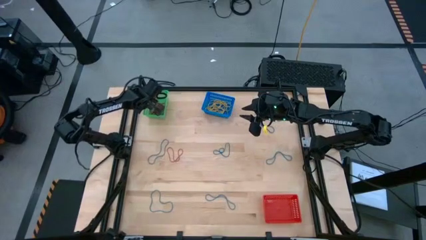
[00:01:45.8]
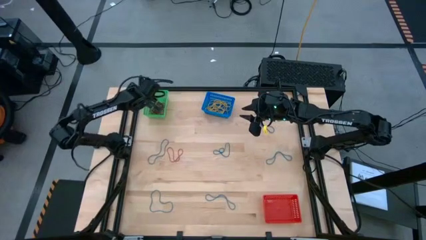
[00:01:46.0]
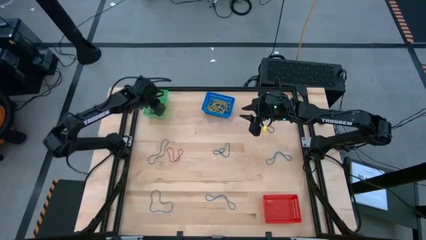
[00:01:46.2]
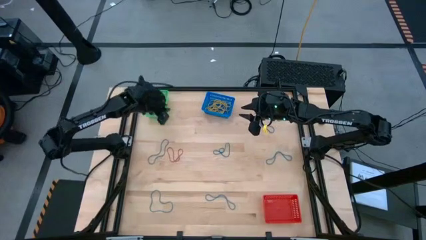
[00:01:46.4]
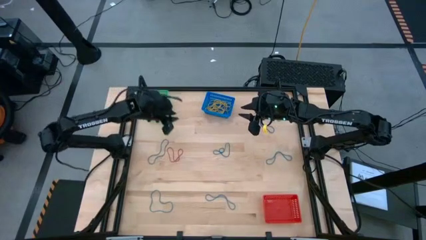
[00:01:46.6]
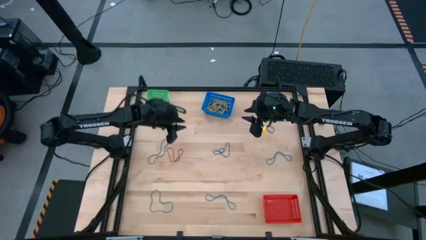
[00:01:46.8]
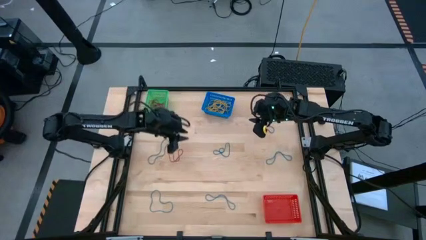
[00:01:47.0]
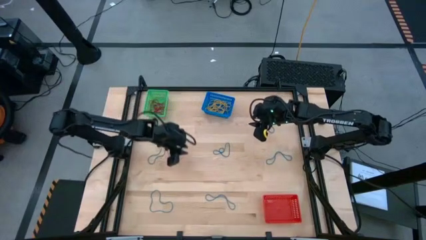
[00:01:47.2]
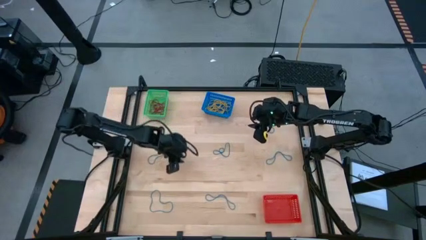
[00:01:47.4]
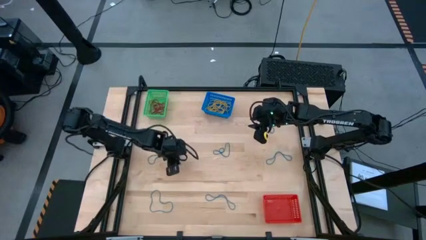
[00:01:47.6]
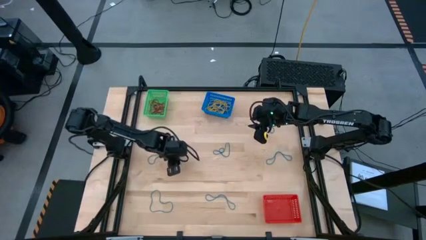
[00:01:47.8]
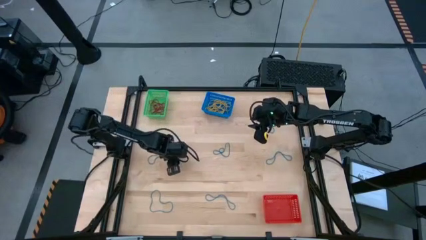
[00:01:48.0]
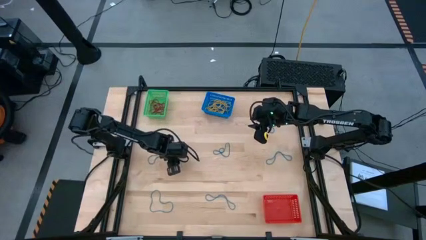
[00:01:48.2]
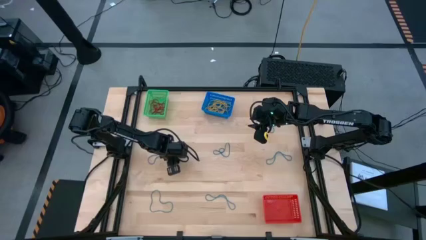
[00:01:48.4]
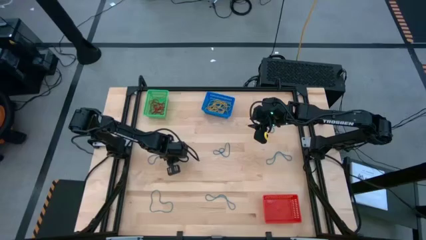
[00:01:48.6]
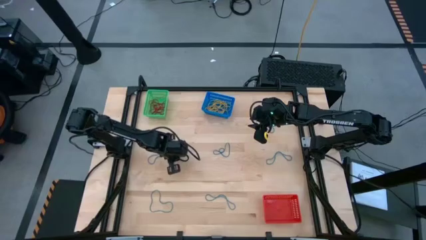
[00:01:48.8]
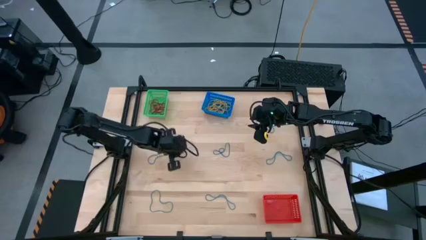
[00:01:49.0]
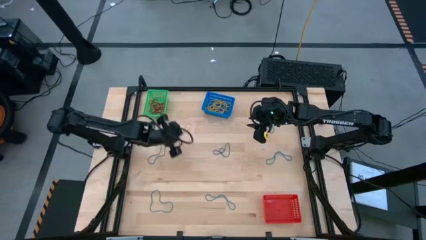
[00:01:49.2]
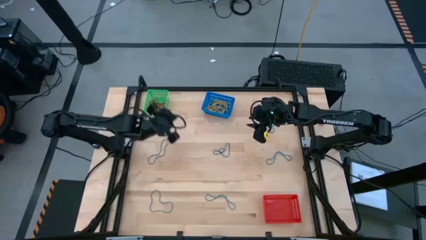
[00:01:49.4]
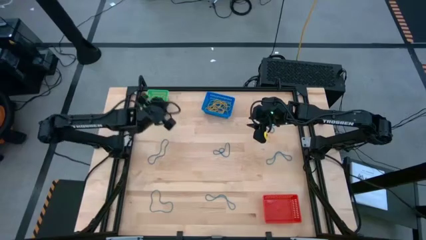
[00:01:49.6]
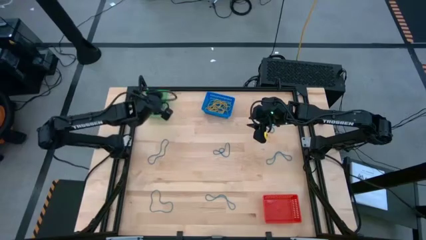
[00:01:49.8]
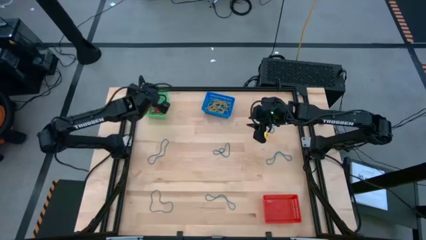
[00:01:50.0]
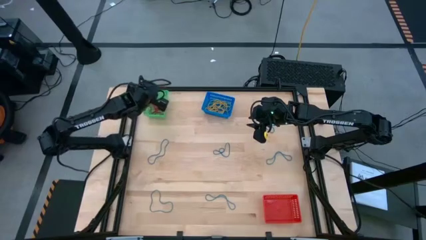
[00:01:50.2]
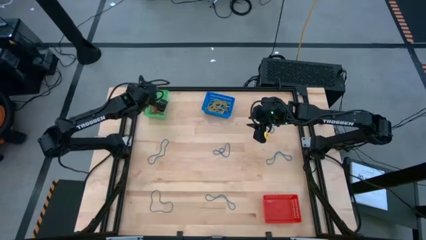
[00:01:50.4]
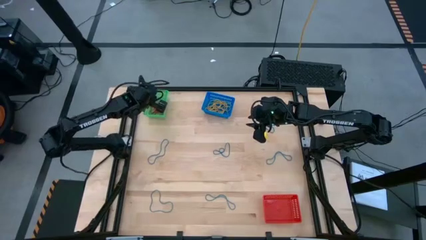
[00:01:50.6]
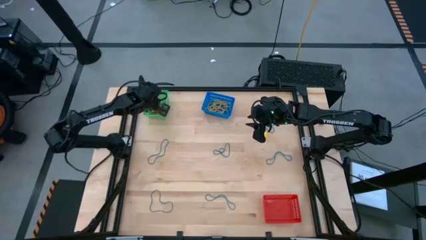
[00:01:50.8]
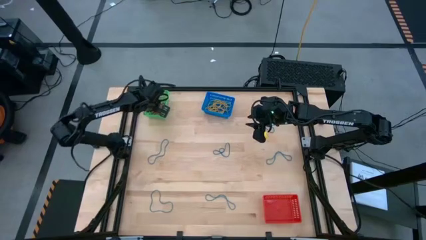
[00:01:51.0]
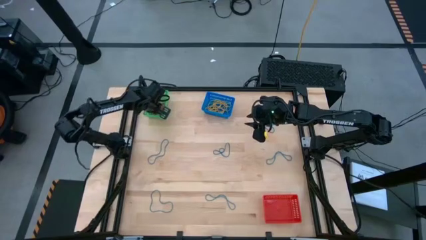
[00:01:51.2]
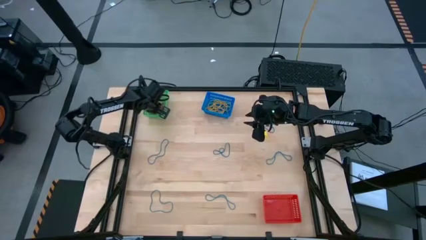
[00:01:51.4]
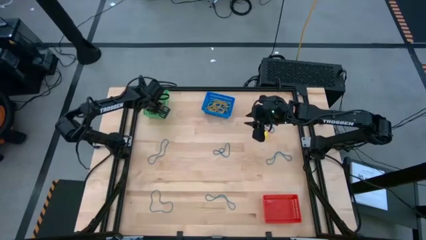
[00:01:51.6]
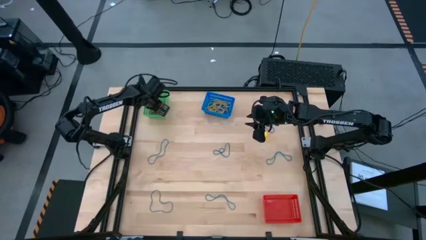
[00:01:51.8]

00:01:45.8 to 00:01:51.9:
Task: Sort rubber bands into baskets
Put the red rubber band into the green bin

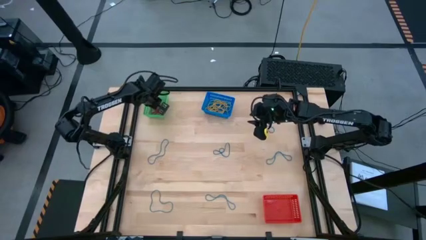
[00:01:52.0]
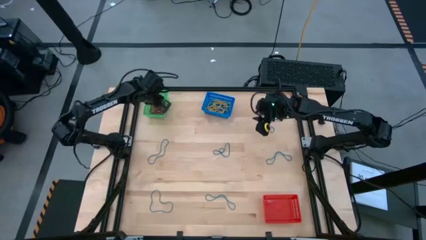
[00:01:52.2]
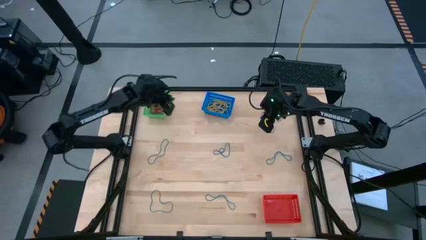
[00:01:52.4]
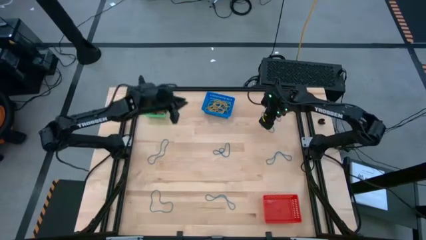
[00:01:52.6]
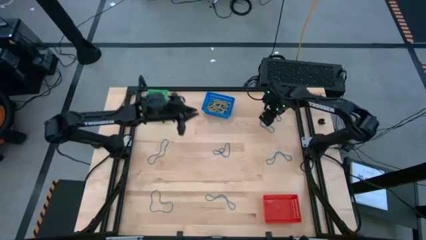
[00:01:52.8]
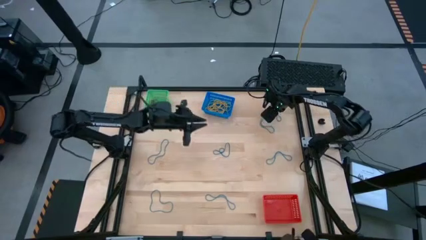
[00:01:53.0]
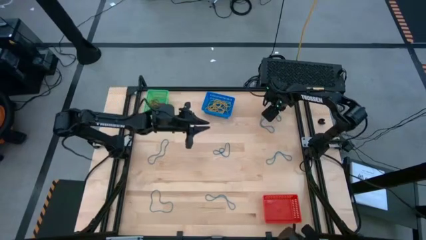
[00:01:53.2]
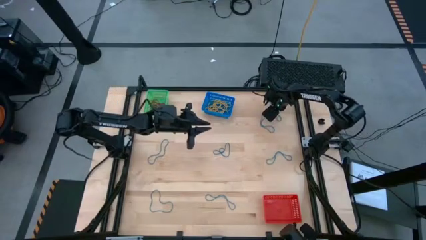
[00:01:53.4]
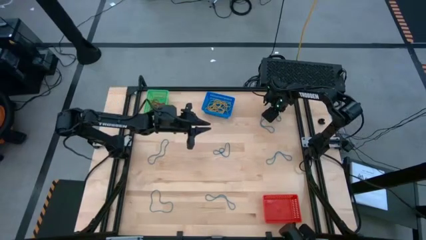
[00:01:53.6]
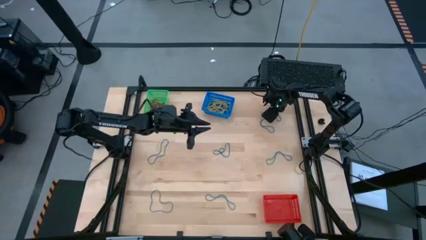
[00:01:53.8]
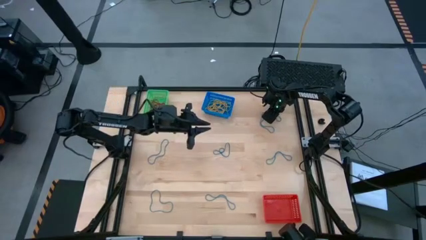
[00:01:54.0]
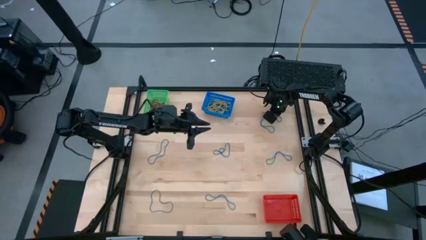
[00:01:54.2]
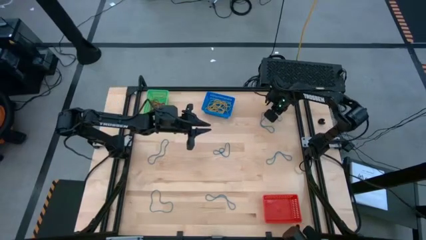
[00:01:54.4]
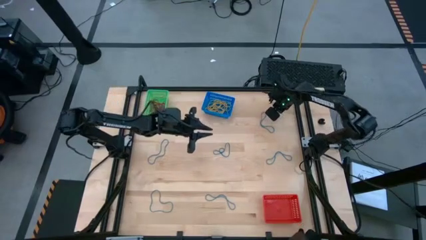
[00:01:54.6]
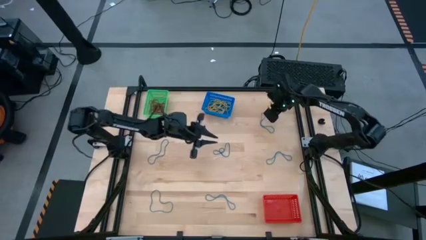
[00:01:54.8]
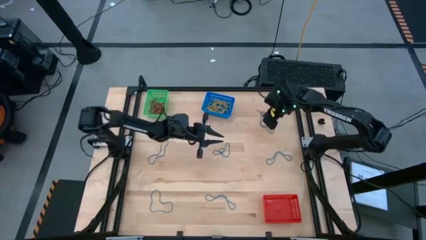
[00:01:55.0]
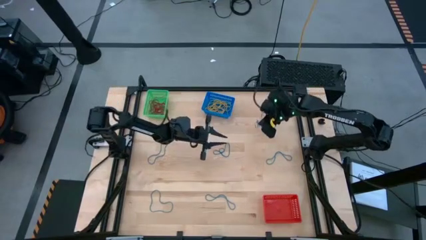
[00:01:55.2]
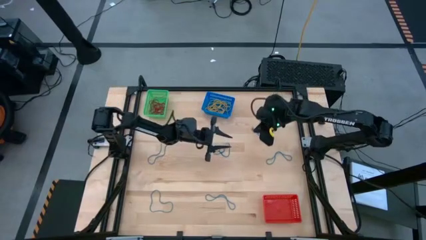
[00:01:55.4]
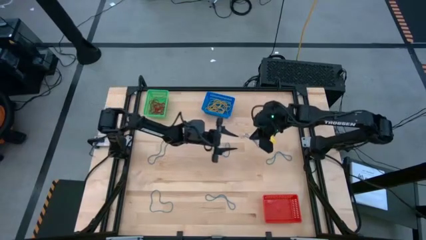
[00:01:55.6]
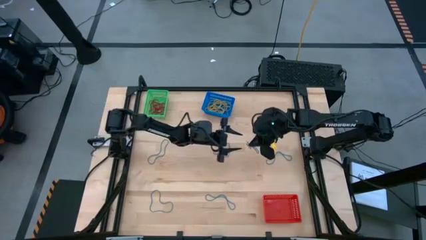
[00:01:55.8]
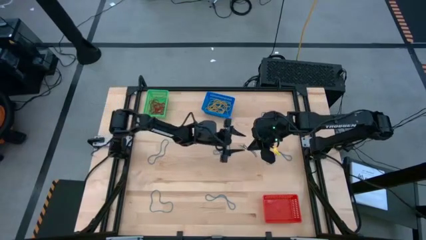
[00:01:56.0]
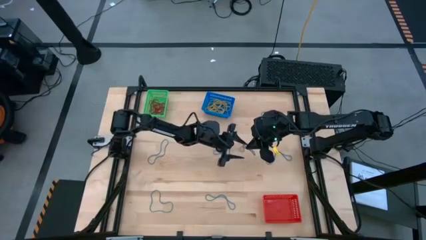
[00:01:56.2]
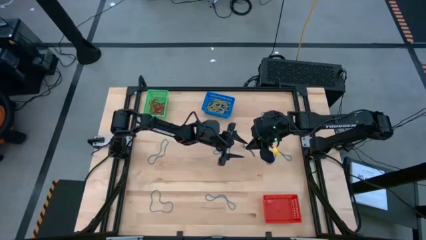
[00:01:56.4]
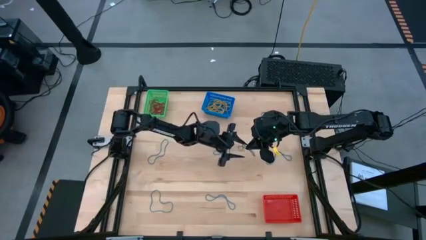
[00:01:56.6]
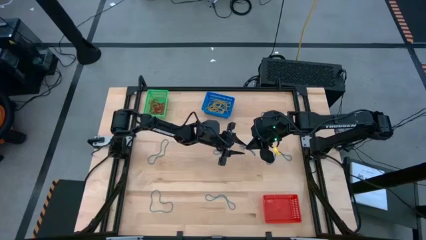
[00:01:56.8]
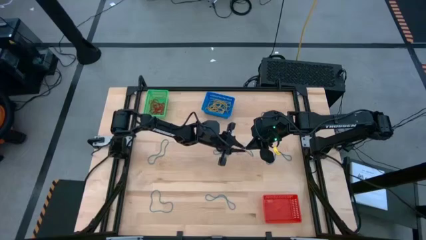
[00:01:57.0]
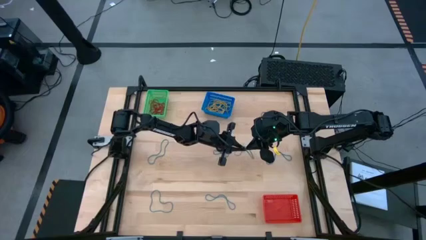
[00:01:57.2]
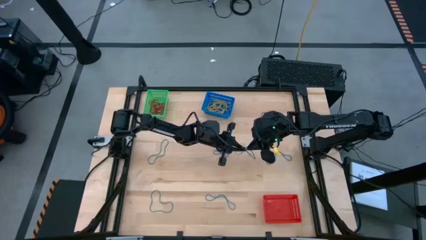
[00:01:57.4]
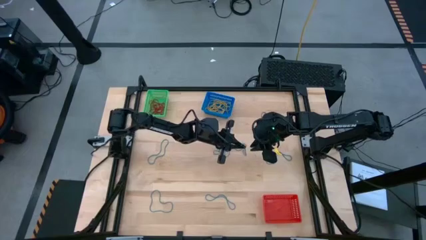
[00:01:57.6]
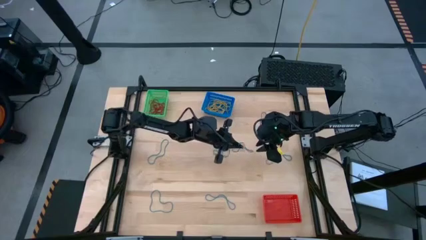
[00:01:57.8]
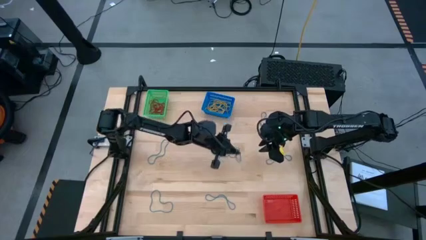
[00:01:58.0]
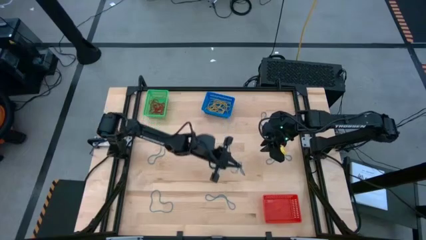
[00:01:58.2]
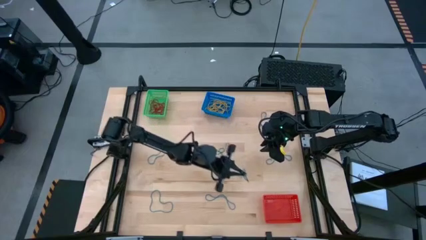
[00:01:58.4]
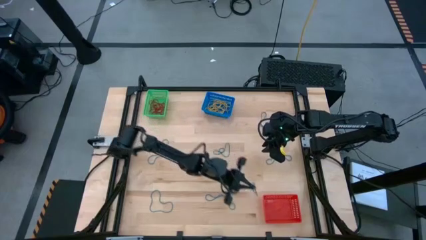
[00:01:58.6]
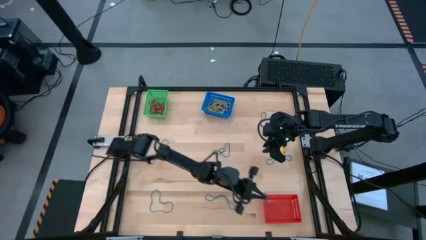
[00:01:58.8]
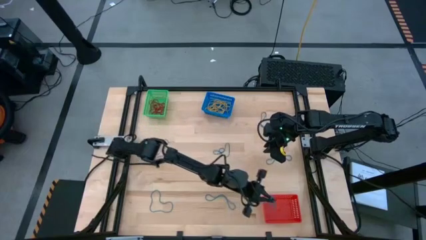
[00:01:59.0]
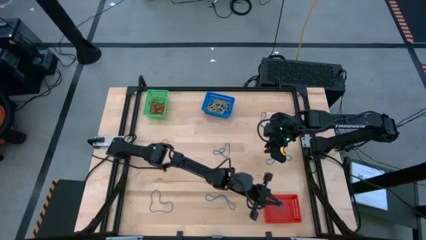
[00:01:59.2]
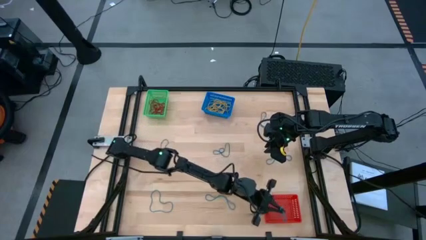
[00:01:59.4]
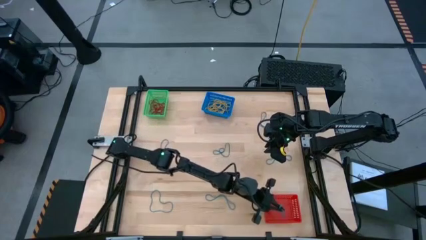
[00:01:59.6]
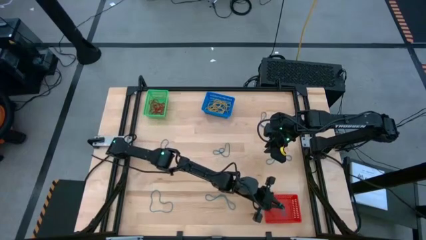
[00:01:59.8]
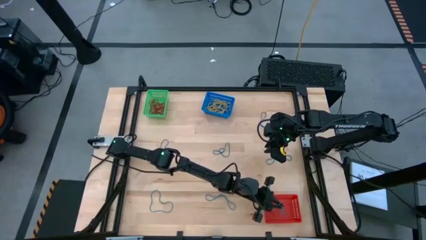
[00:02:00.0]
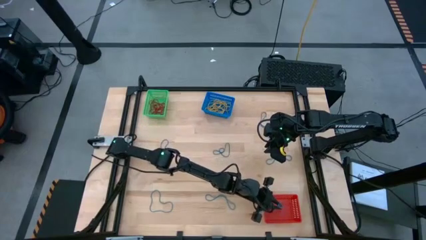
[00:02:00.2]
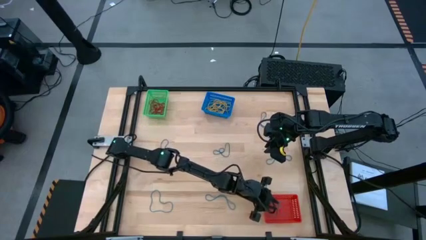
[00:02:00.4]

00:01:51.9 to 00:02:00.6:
Put the blue rubber band into the red bin

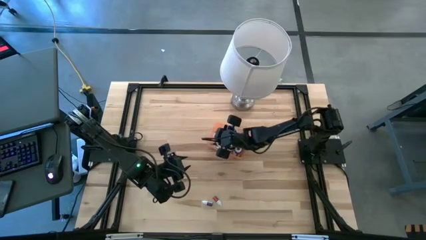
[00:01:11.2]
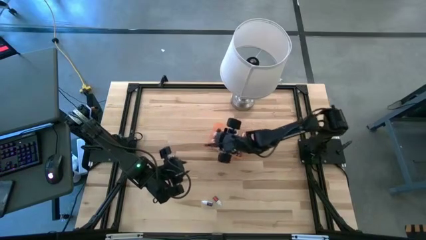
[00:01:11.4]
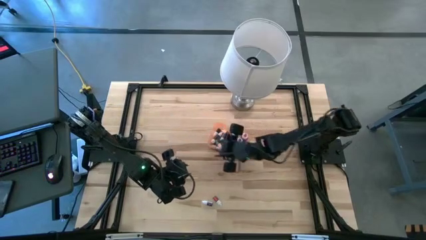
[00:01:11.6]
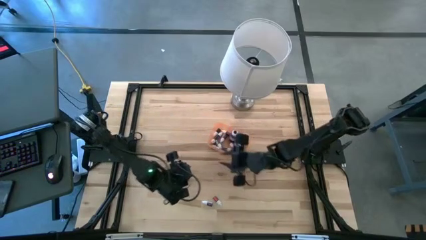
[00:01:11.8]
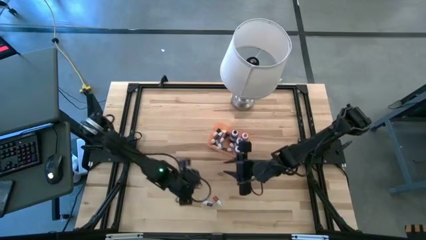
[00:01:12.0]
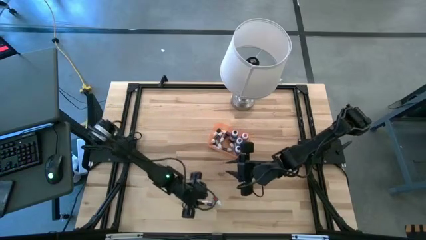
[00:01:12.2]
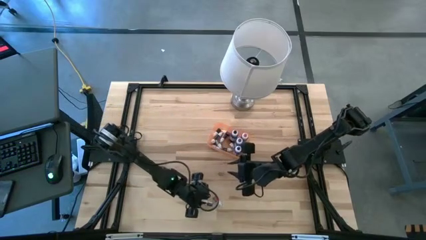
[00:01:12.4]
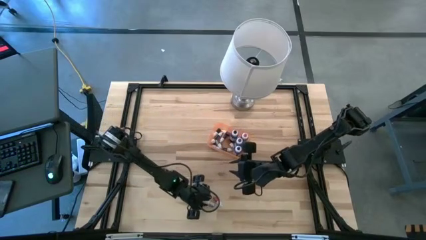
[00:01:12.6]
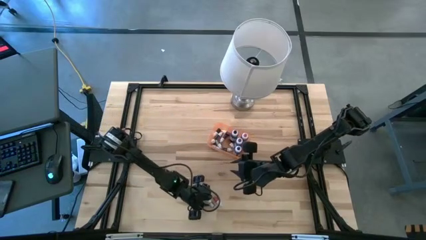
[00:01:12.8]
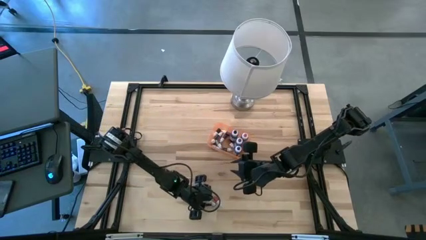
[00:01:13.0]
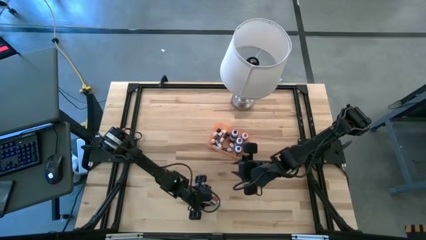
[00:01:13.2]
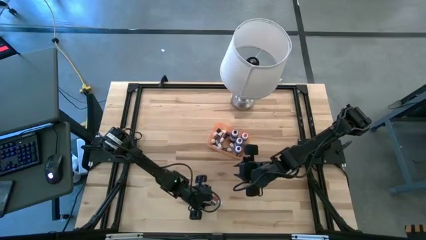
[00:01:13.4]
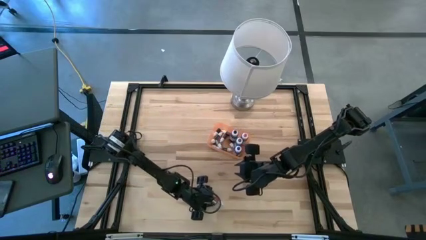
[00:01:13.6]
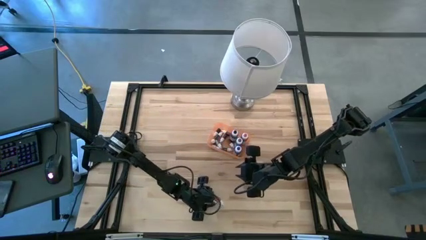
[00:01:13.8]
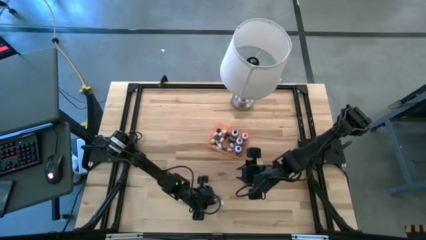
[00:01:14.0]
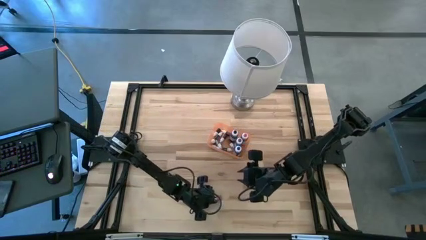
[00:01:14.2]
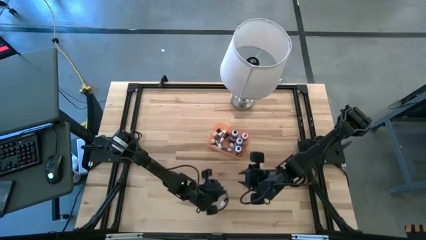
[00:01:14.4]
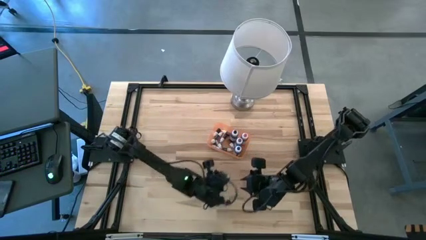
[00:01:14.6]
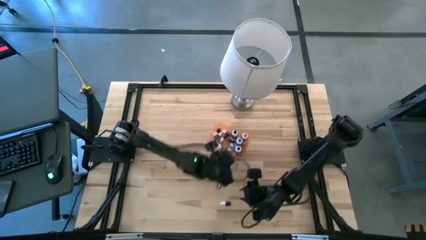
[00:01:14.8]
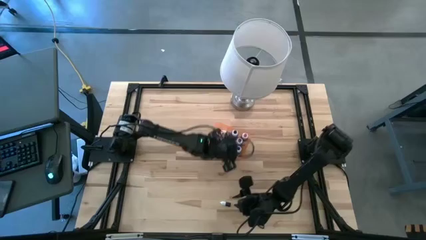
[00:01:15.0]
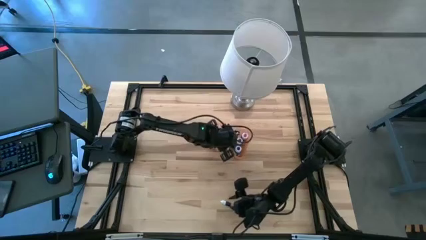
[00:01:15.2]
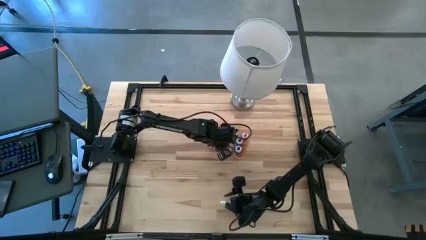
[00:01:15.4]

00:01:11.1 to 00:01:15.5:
Task: Pick & Place food coloring
Put the small purple food coloring bottle into the orange bin
